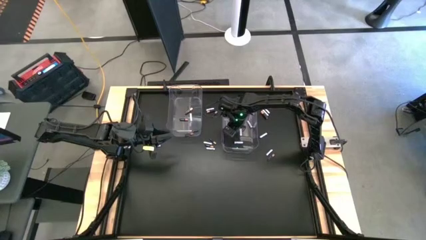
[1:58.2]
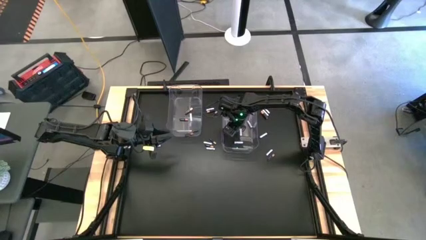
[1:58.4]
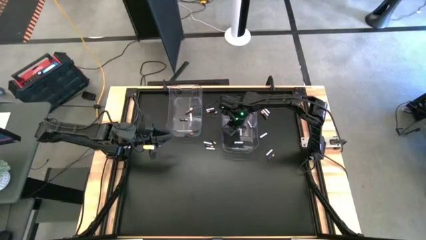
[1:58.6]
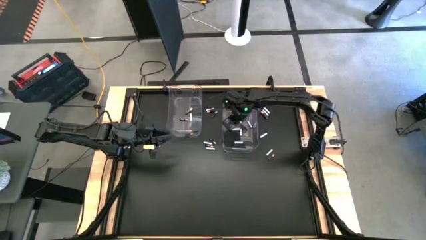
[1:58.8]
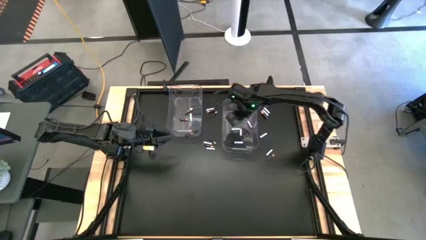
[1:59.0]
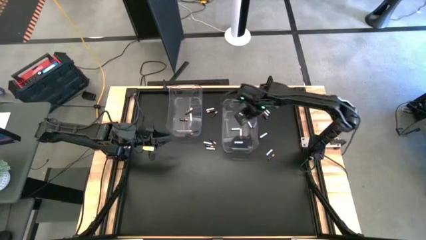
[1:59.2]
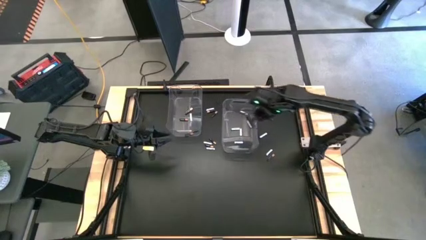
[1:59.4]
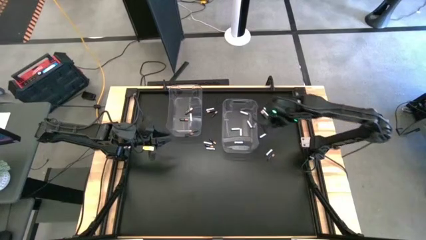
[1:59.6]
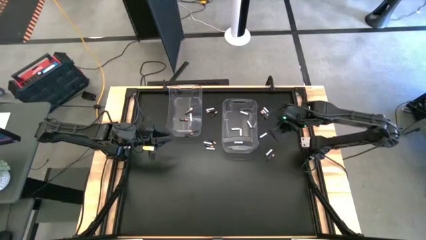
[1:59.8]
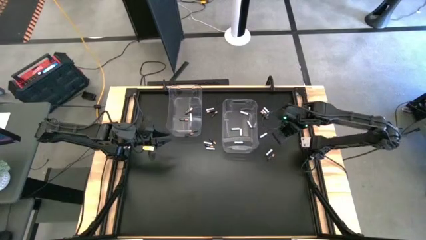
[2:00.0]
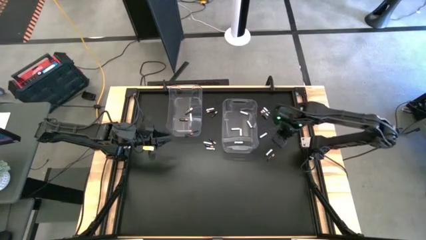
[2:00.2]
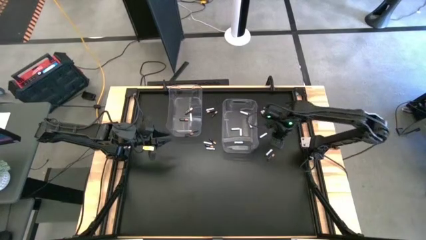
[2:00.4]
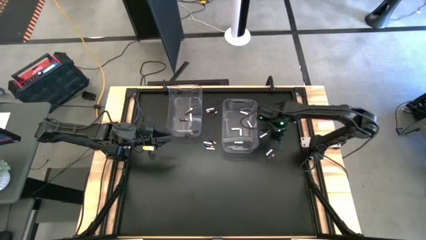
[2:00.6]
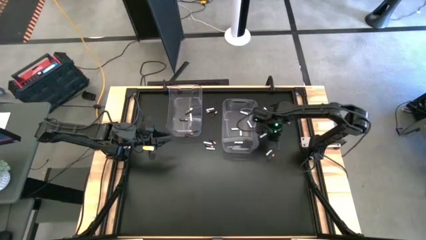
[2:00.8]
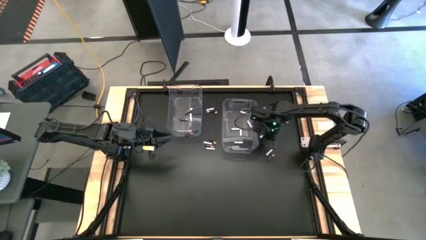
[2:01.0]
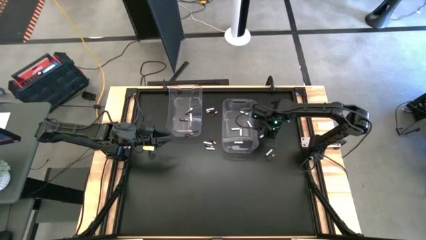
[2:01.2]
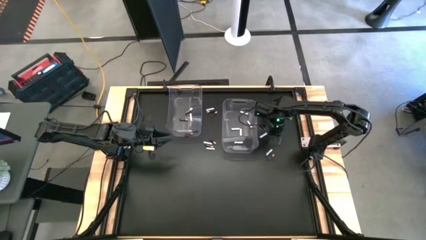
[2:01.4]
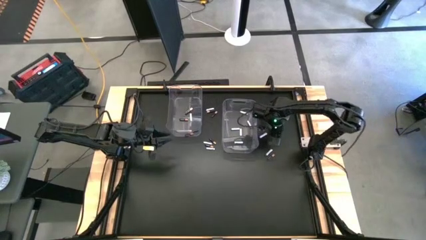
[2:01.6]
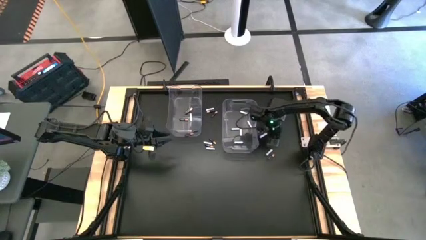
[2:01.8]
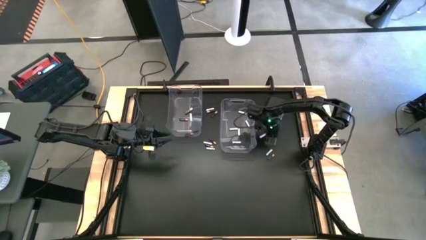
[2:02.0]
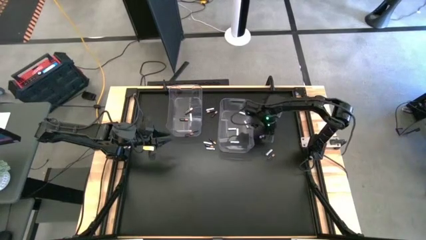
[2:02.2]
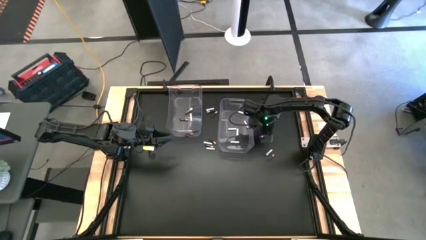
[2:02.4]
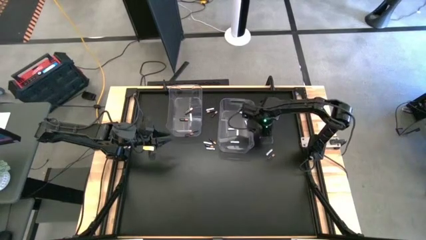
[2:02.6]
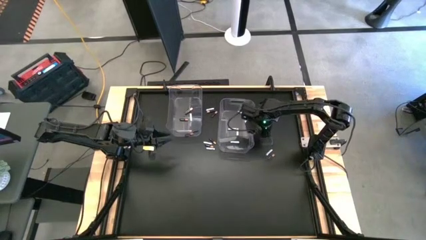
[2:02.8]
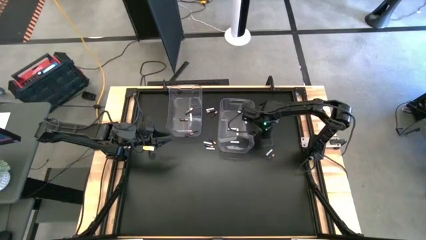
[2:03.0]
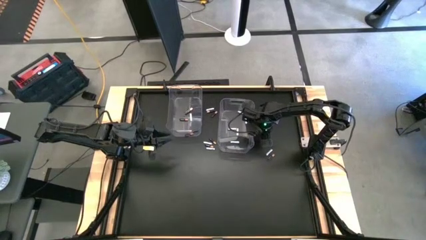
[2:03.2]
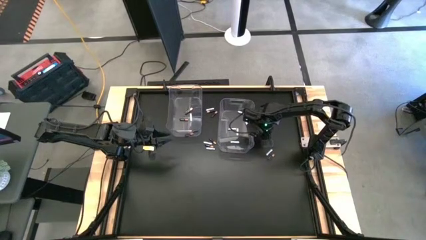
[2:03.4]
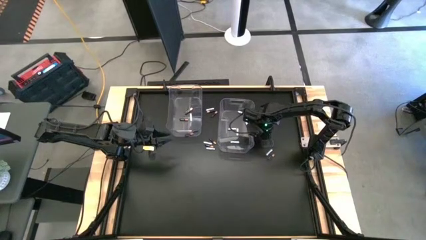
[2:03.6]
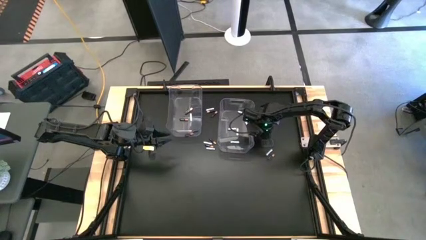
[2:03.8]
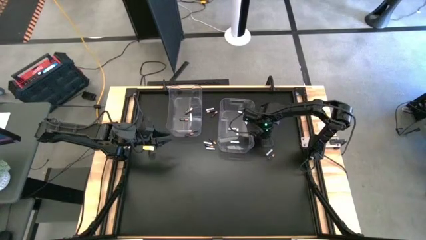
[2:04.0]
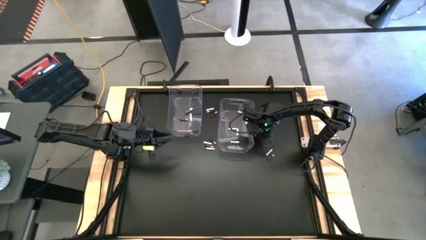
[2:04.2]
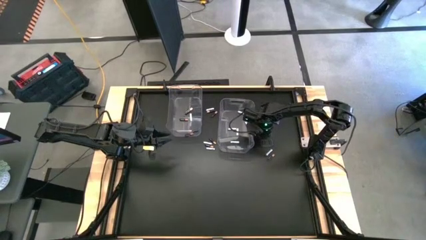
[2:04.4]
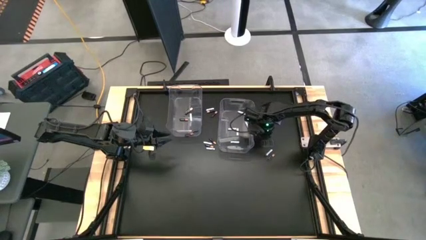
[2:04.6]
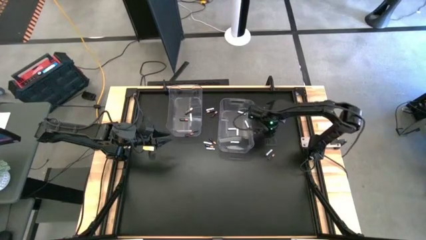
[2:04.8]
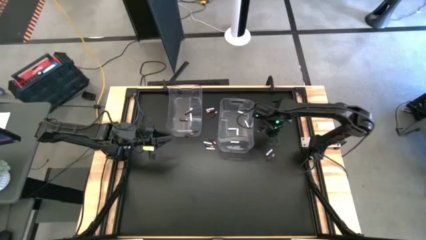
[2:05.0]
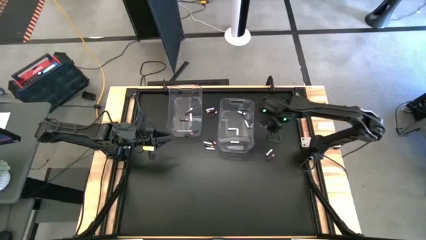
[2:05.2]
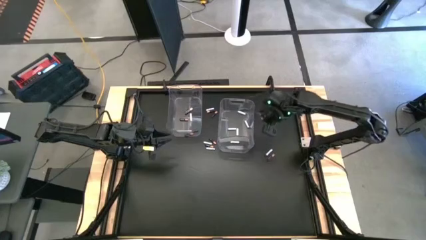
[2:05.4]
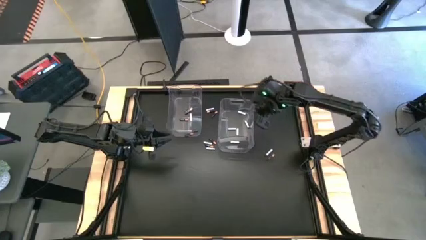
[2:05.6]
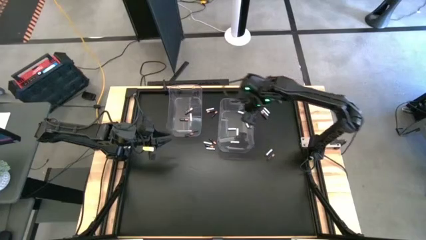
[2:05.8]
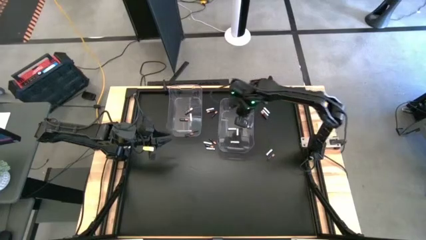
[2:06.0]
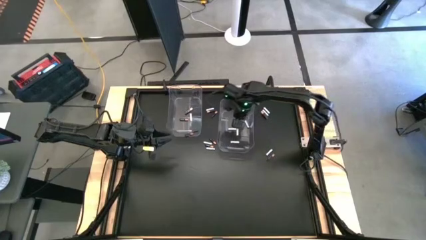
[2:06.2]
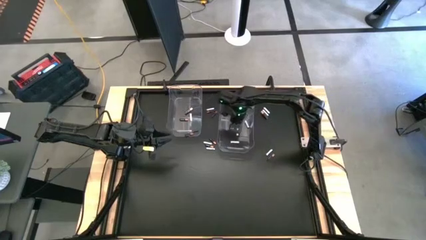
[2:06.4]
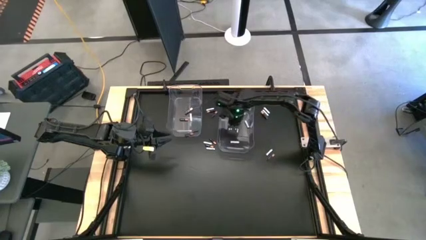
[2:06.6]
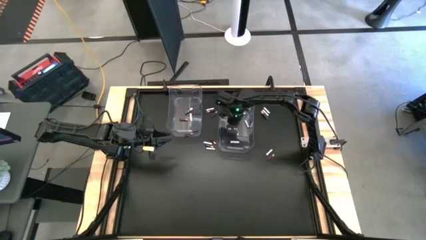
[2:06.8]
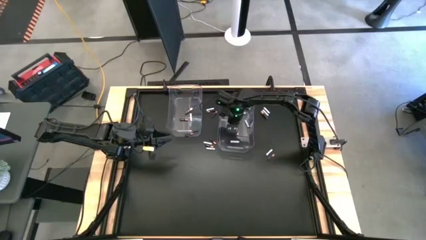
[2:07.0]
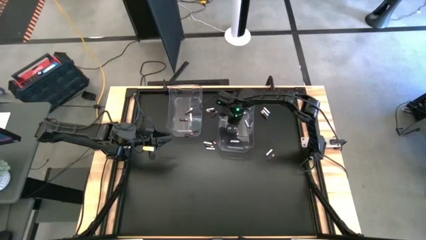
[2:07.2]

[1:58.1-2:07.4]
Task: Sort batteries
Put the white battery into the right transparent bin

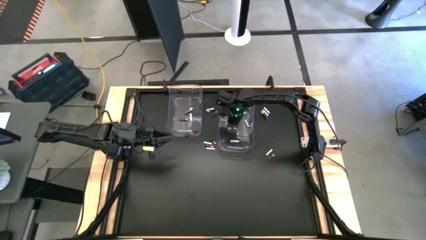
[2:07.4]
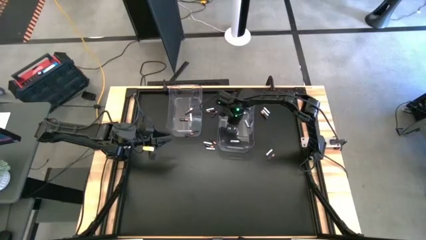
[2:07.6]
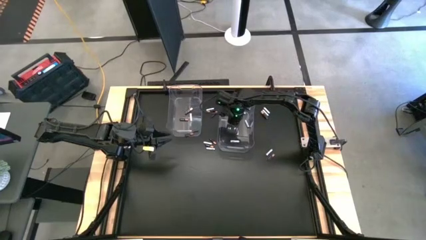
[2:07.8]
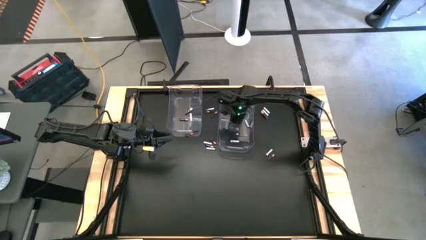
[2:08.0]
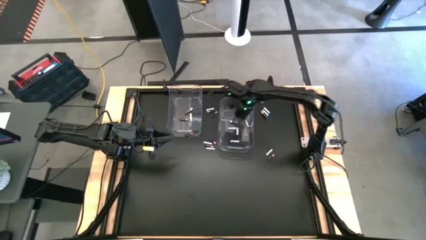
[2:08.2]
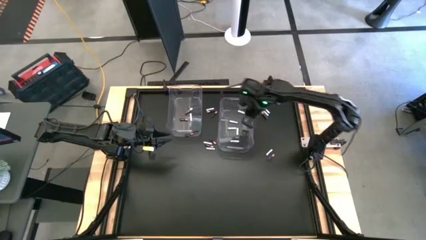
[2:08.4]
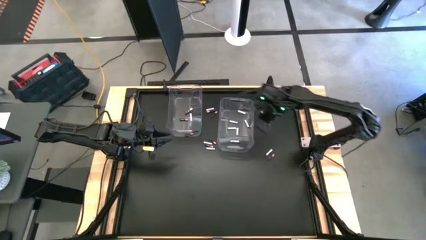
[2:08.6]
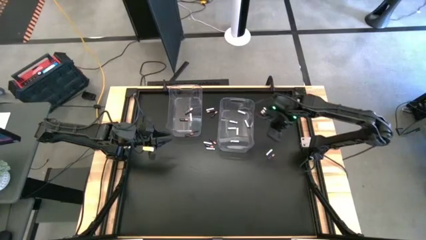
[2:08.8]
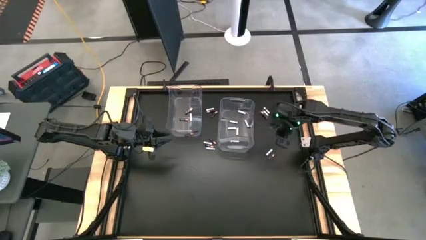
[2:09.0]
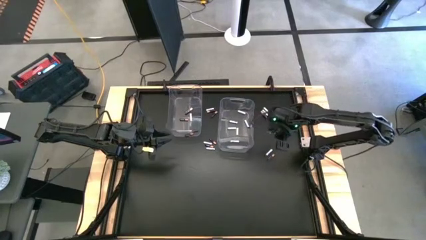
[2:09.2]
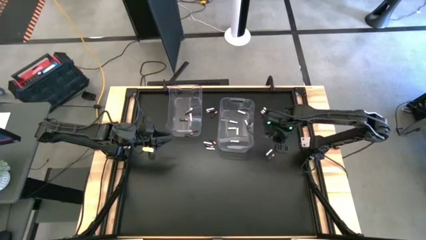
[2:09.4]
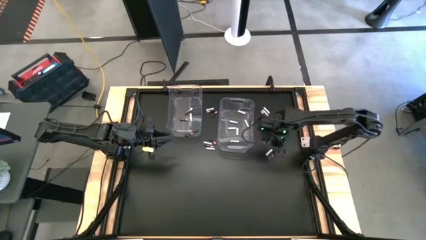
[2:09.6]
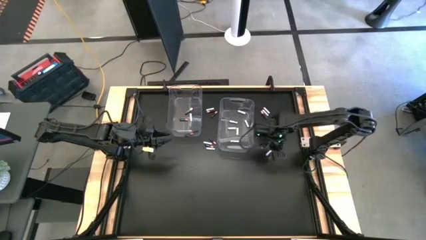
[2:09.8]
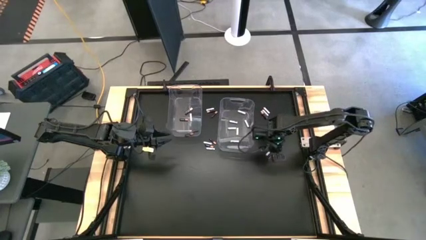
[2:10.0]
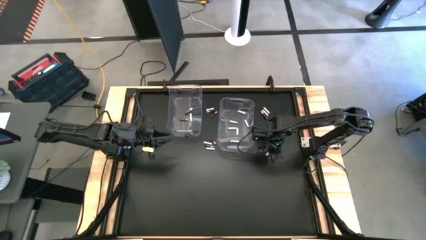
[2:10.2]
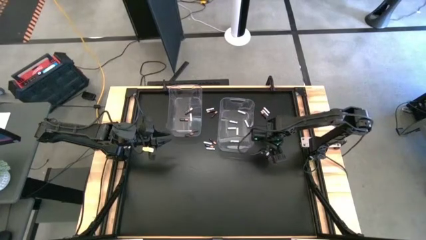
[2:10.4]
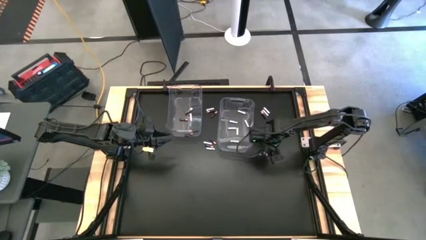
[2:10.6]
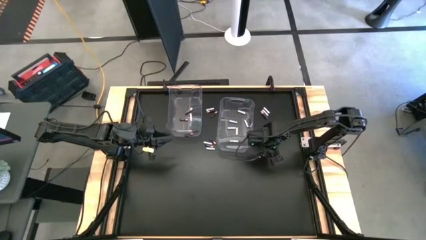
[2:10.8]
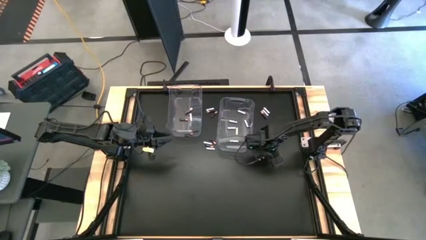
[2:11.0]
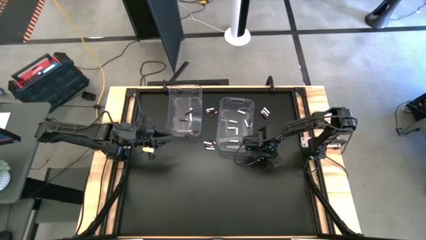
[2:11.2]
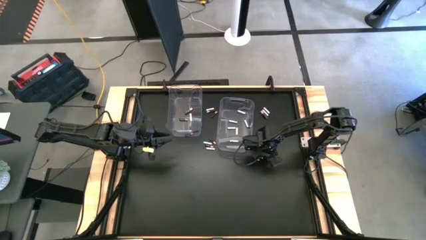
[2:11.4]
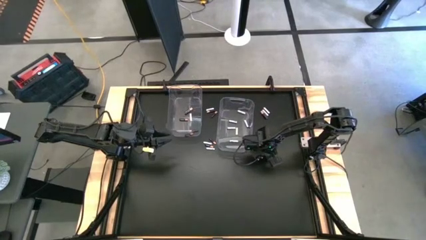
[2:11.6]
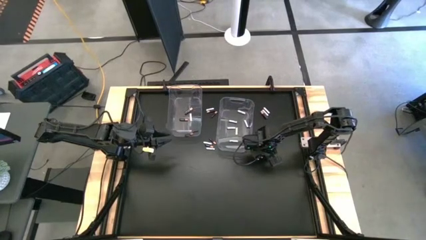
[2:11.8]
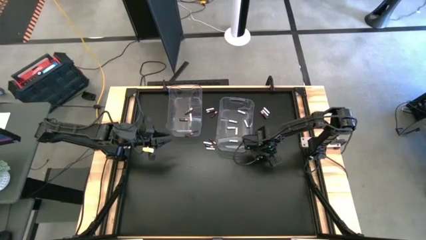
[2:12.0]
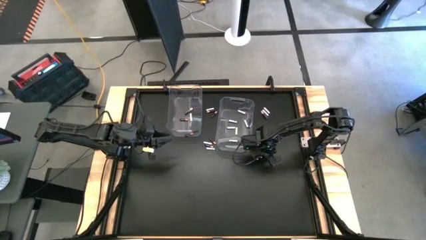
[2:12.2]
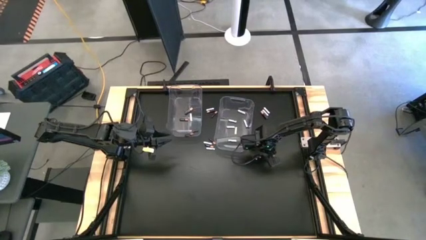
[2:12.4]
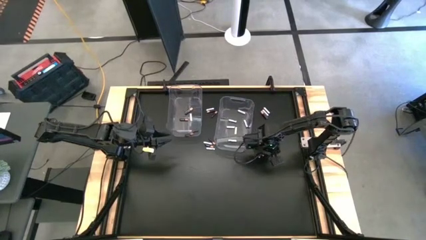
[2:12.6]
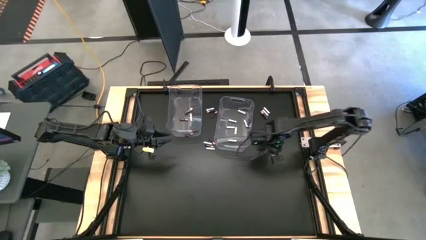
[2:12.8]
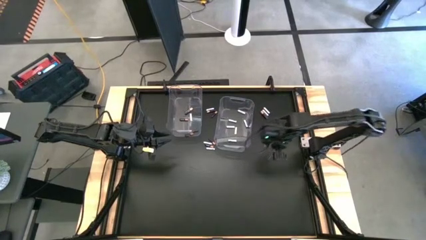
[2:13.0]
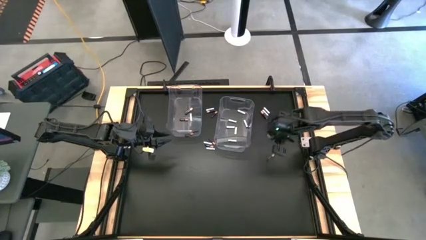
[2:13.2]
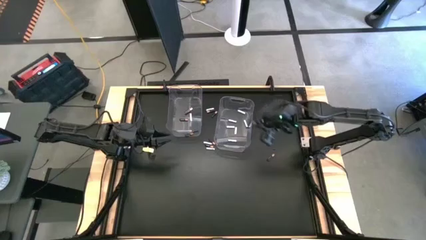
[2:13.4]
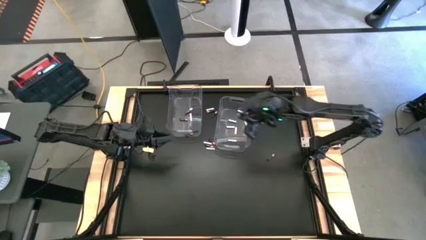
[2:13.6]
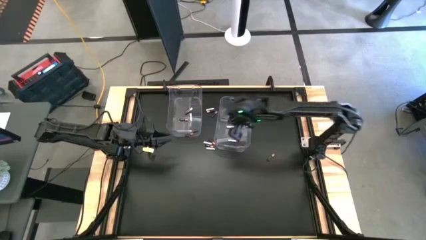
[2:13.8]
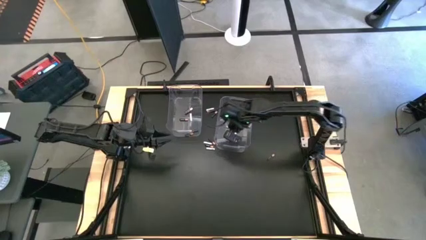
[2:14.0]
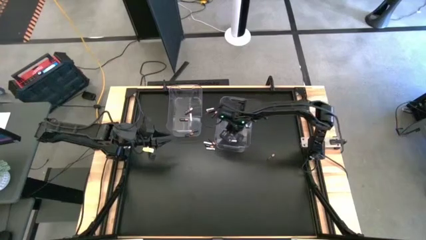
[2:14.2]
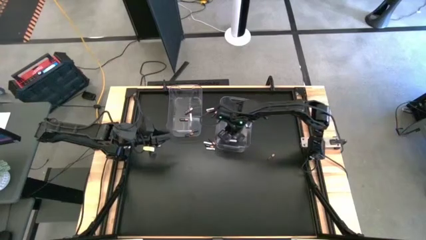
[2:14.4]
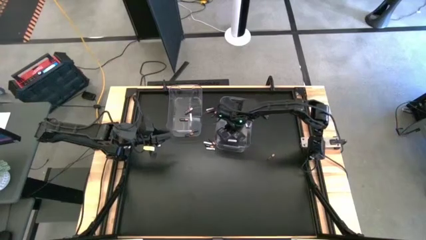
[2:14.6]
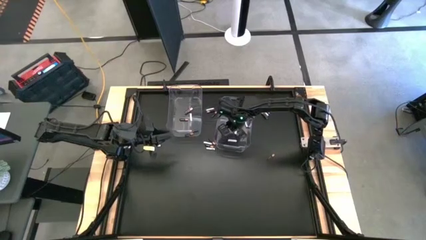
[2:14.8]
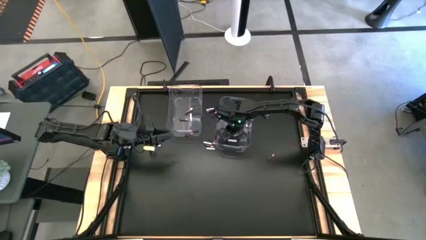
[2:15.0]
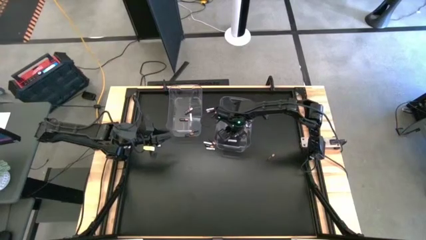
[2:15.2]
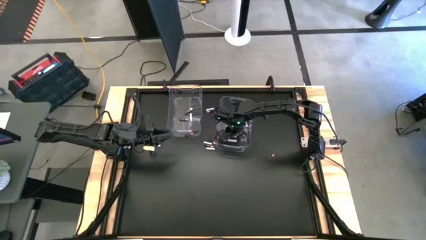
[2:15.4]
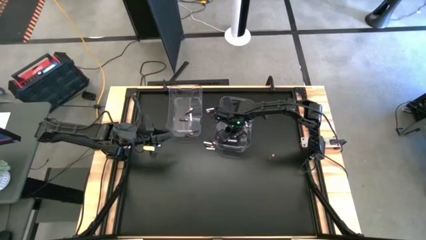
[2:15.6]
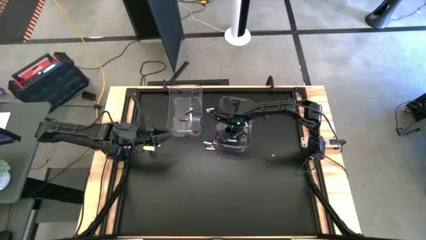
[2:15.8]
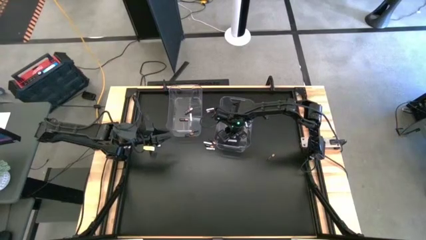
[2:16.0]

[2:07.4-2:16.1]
Put the white battery into the right transparent bin
